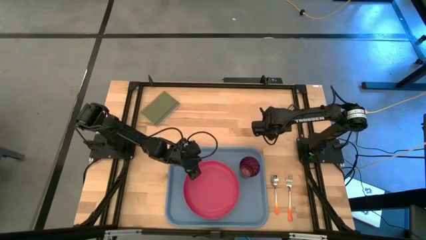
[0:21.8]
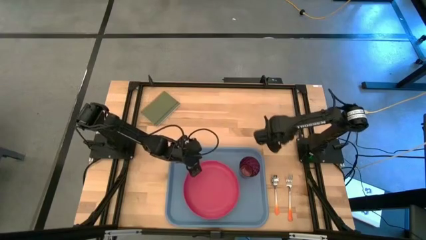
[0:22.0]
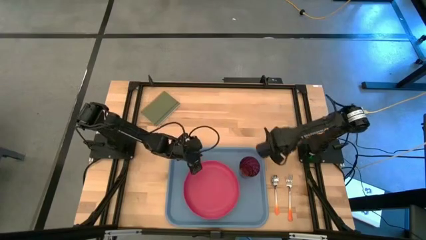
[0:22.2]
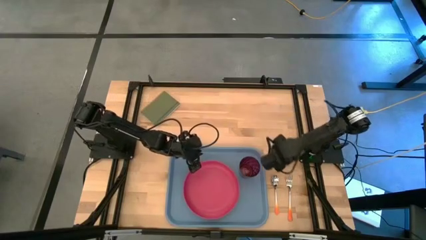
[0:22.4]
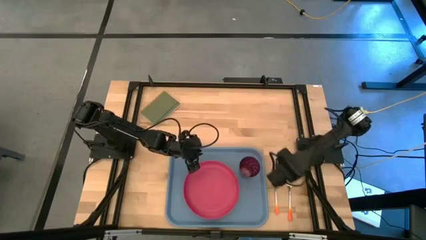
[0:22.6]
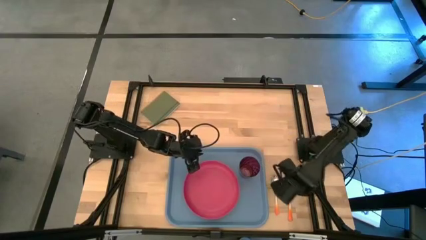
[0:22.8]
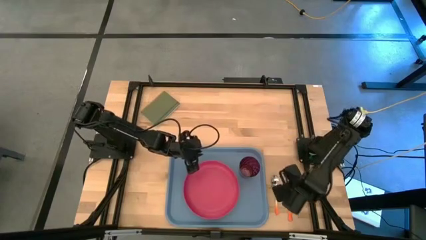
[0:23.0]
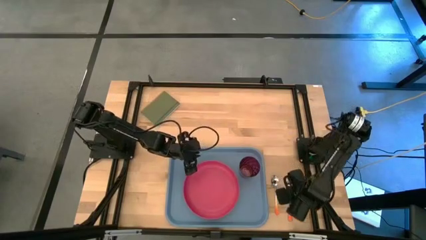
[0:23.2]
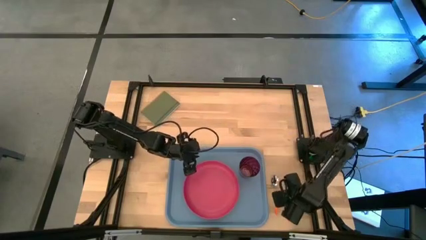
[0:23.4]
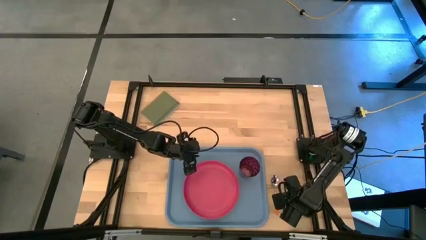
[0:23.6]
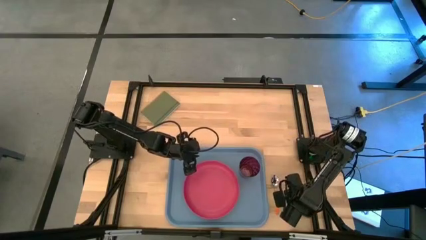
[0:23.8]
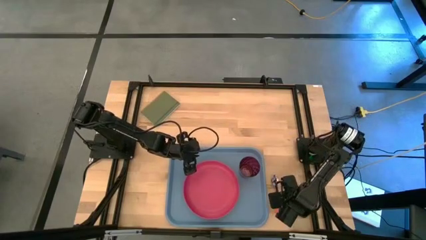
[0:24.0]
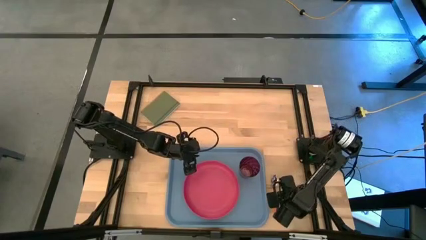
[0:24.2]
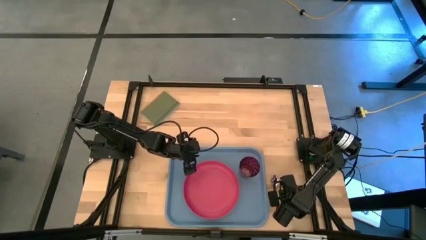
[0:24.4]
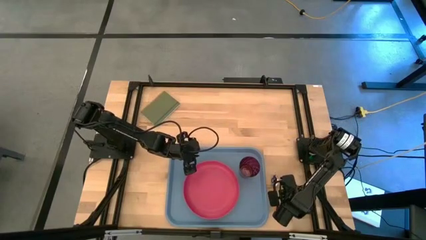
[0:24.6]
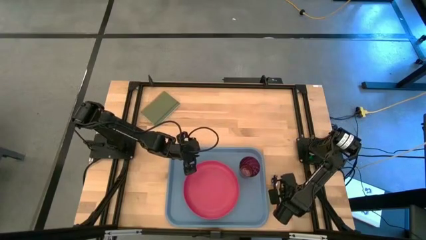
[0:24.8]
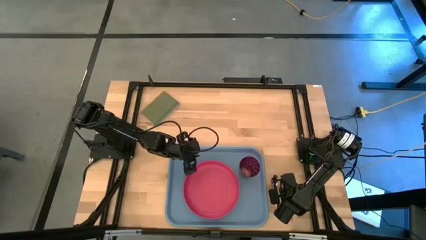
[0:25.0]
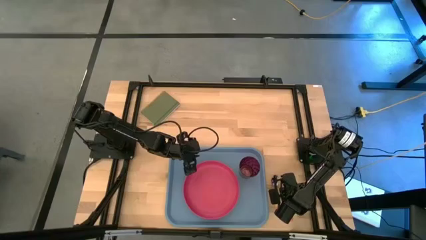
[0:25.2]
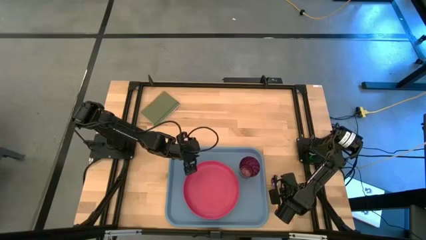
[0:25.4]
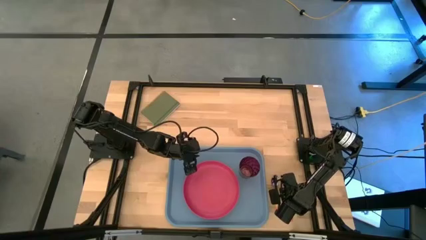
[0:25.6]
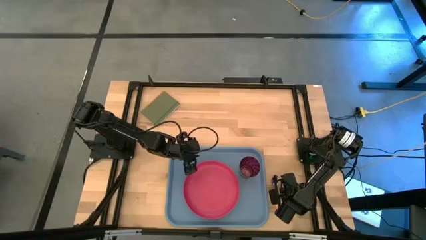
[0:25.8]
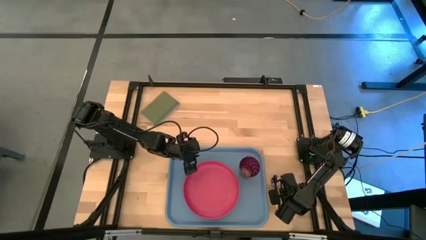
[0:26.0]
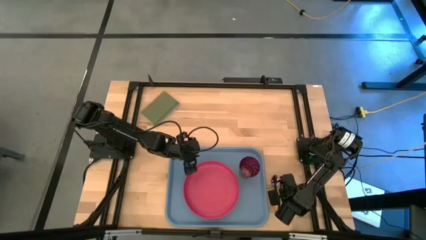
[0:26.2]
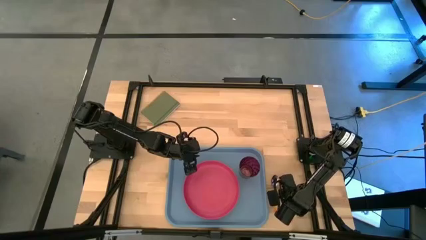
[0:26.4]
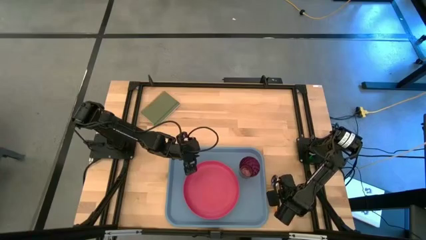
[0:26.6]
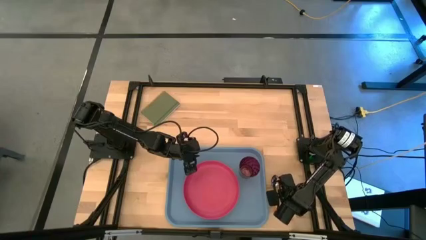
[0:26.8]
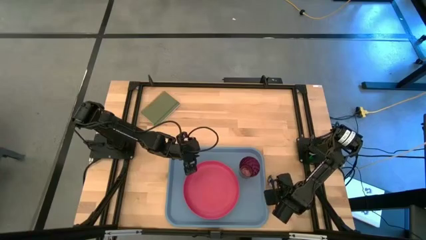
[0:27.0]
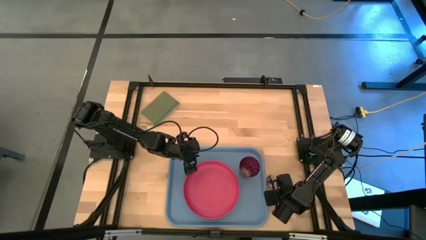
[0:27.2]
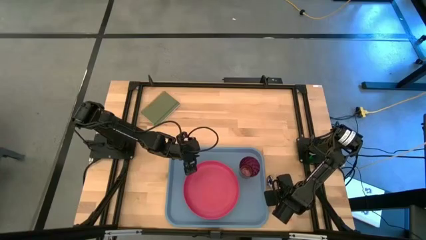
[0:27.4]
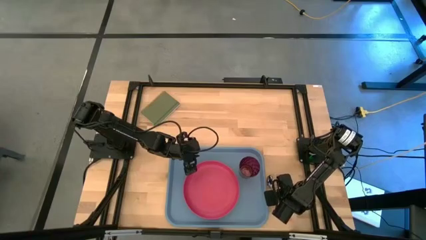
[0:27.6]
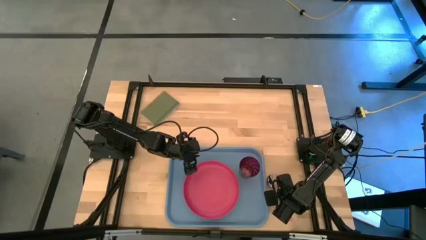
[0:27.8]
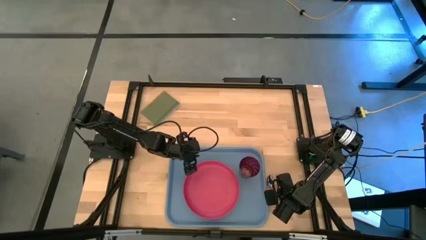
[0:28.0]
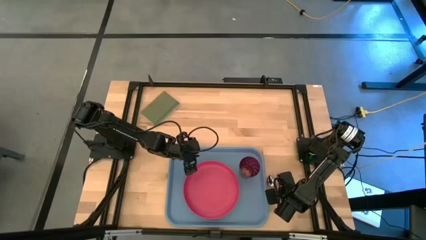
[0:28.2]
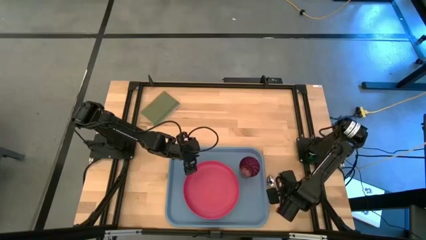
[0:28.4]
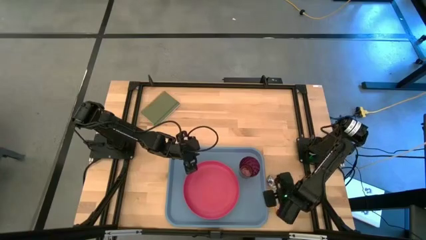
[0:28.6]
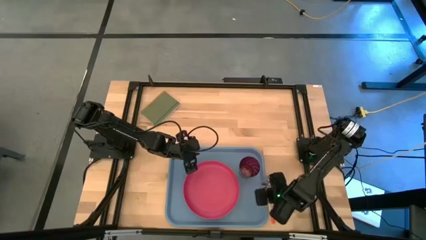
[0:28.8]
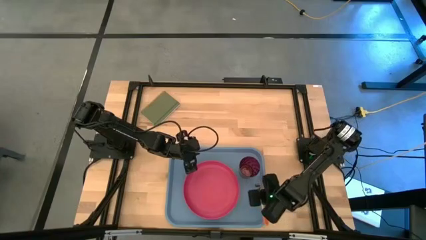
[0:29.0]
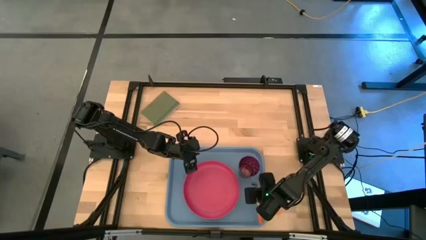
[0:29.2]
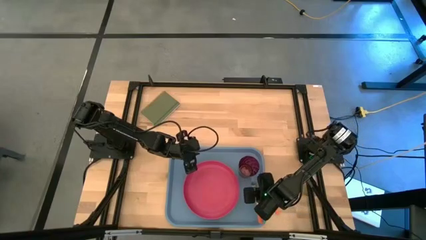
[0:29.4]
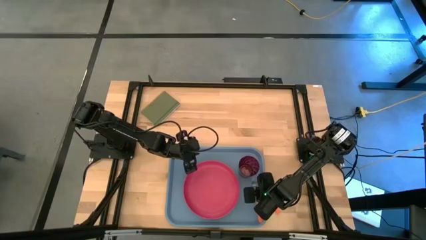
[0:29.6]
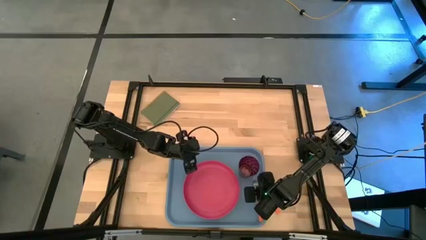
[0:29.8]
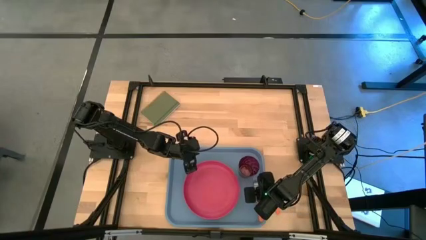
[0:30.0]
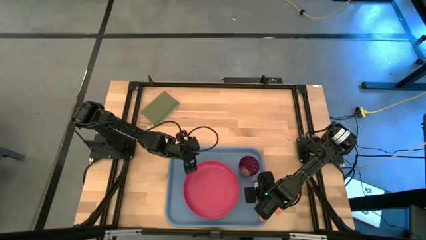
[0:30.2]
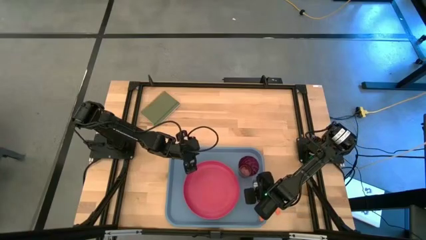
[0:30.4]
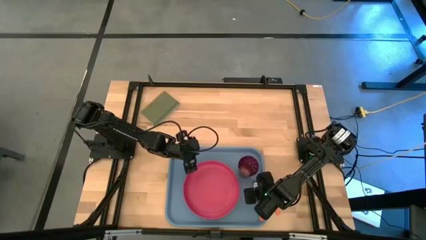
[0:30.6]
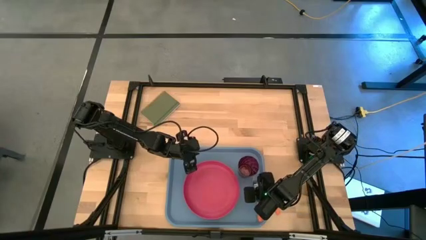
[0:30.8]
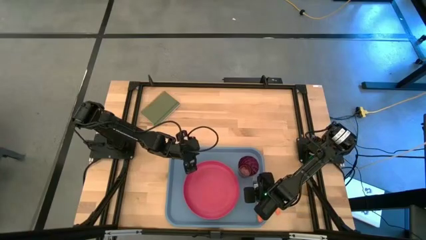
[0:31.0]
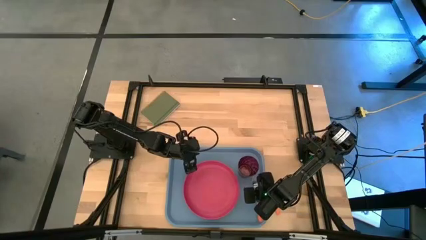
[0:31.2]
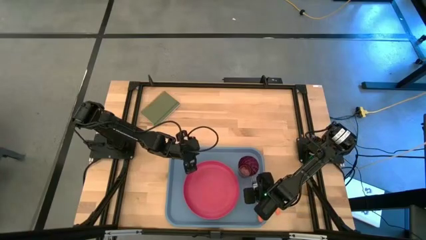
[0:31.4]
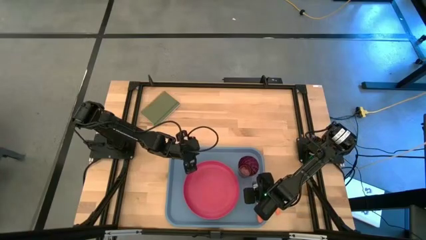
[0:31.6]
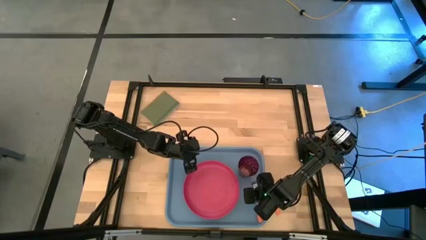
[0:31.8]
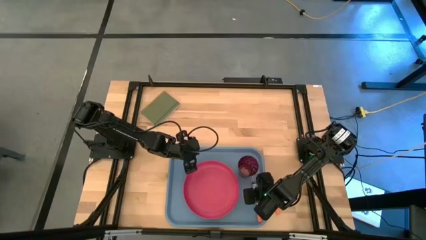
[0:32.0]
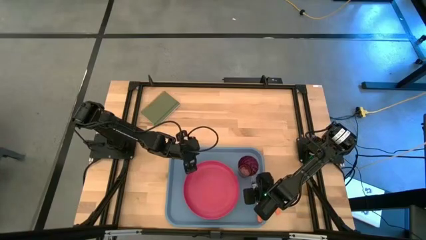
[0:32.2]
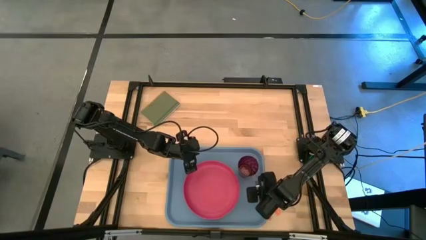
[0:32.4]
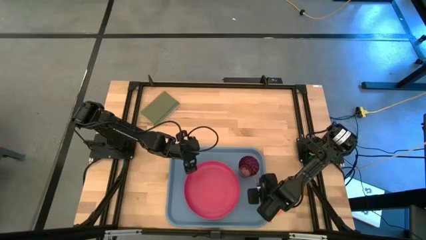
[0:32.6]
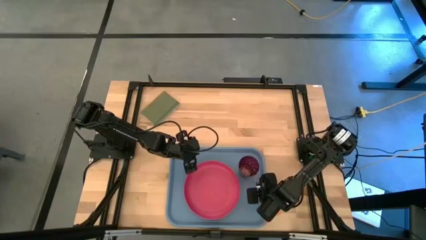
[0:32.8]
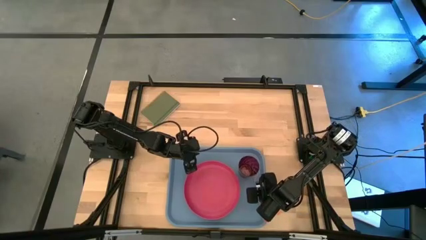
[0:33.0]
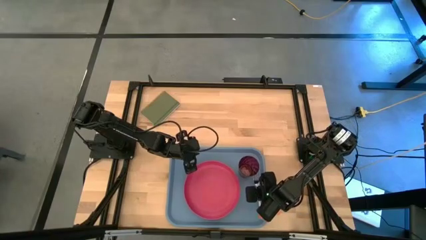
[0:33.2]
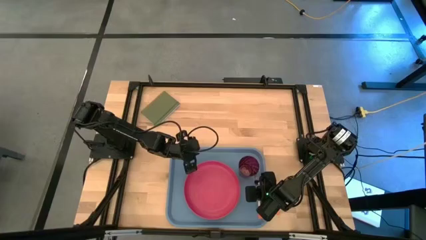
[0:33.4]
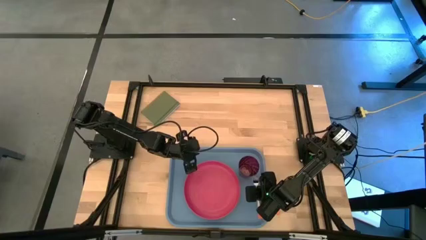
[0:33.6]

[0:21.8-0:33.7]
Task: Pick and place plate/cup/fork/spoon on tray
Put the orange fork on the blue tray to the right of the pink plate

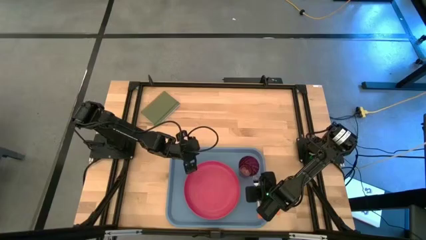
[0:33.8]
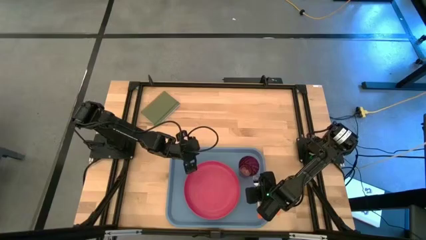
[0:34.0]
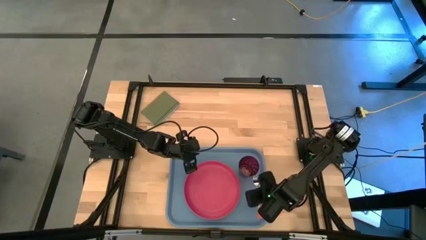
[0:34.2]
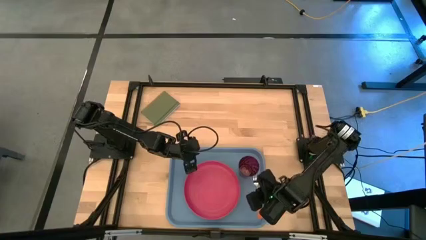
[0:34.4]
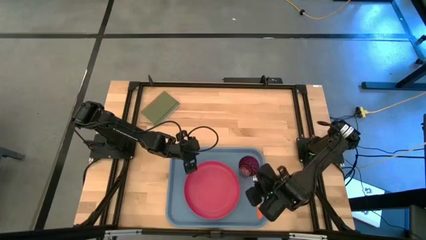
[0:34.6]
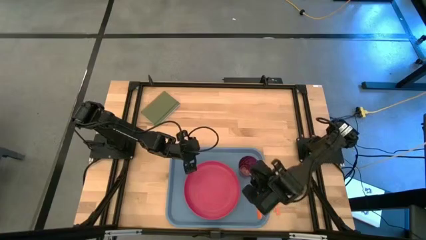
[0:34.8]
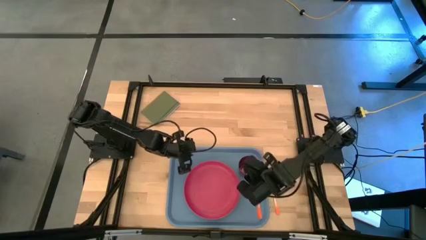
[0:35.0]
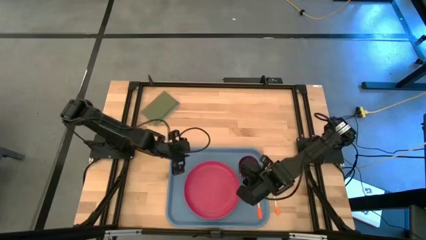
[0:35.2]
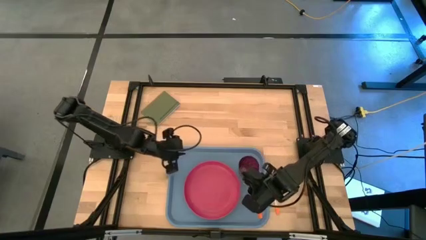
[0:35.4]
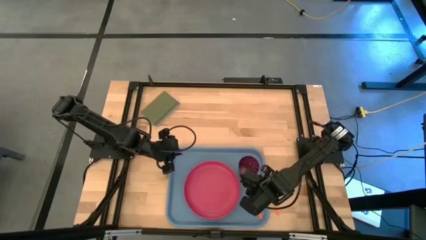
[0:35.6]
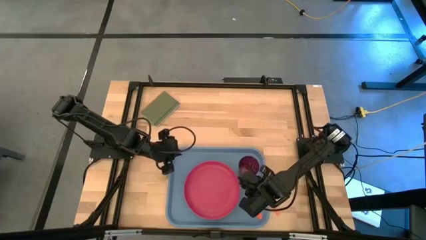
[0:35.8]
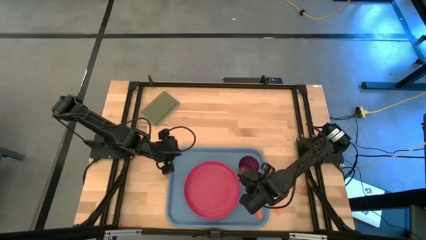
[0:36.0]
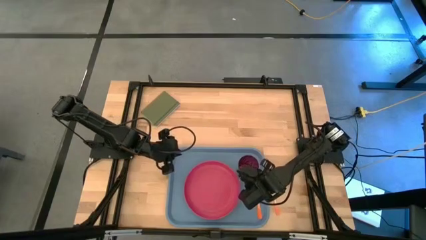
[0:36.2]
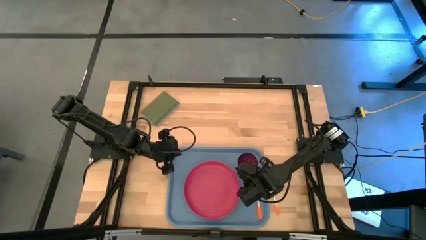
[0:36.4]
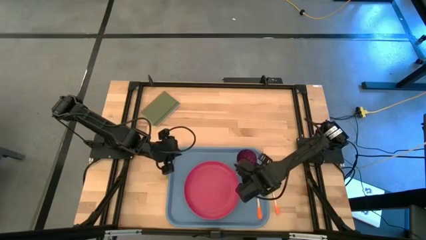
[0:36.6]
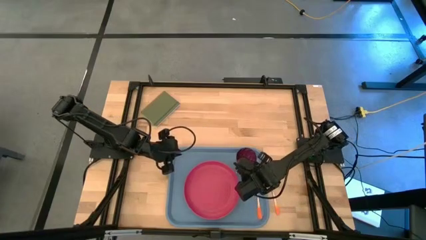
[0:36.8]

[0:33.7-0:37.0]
Adjust the red cup on the blue tray

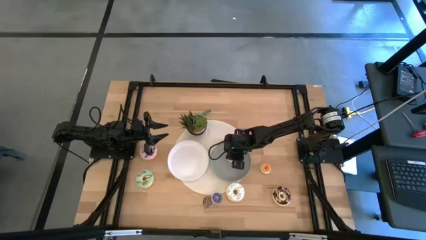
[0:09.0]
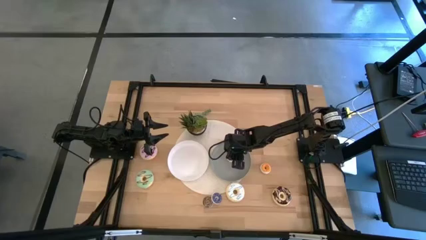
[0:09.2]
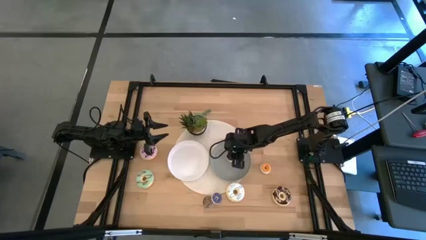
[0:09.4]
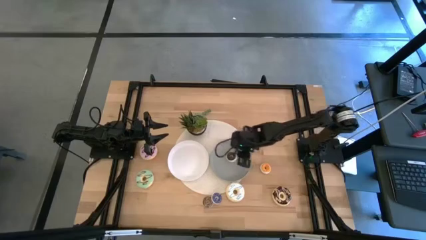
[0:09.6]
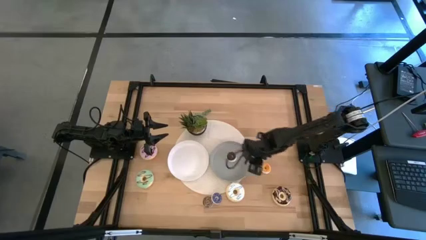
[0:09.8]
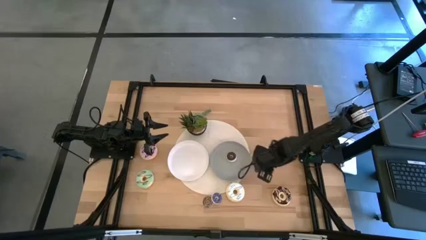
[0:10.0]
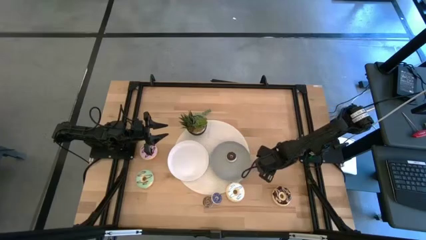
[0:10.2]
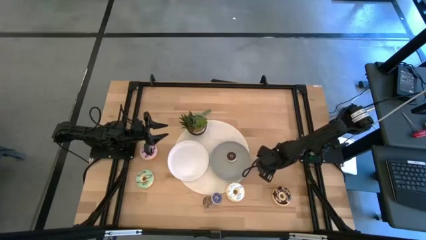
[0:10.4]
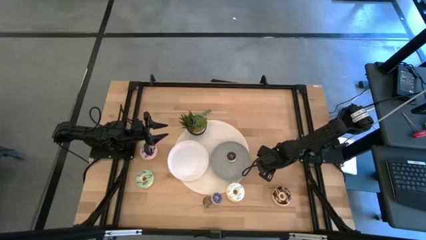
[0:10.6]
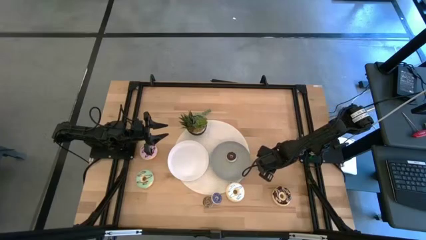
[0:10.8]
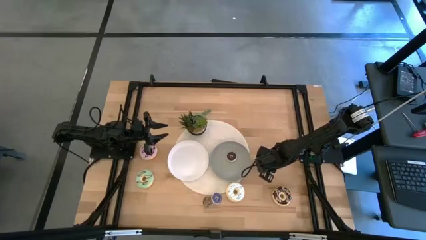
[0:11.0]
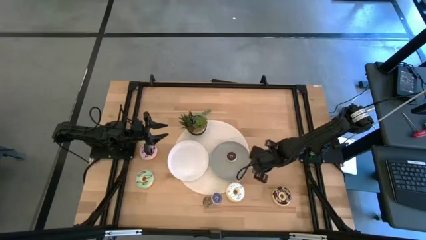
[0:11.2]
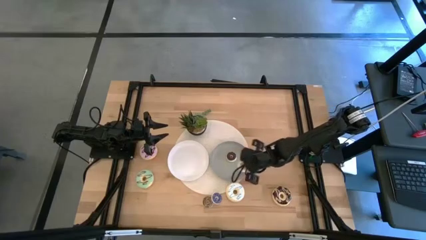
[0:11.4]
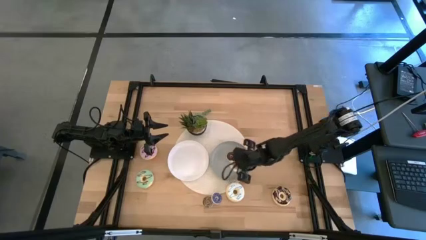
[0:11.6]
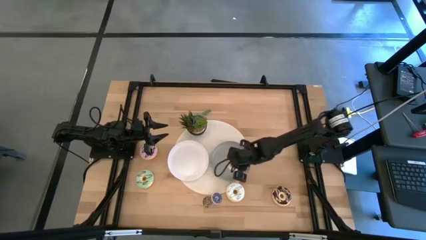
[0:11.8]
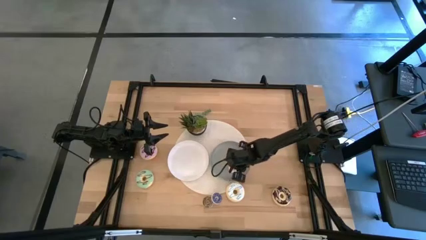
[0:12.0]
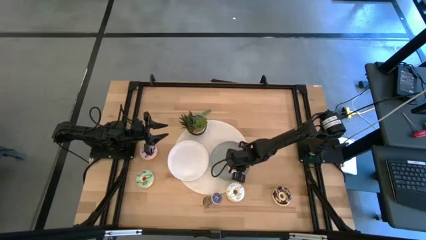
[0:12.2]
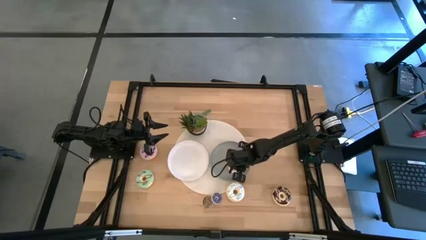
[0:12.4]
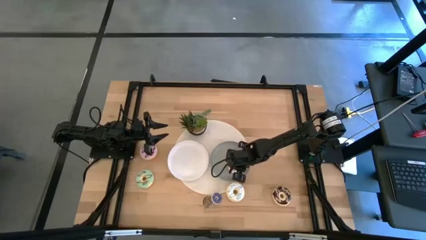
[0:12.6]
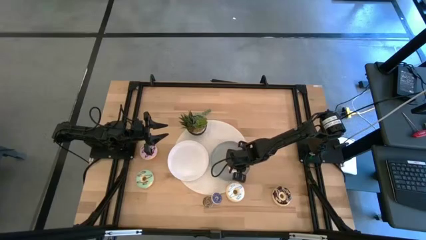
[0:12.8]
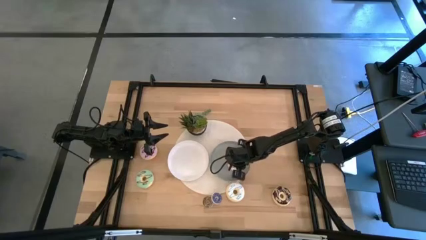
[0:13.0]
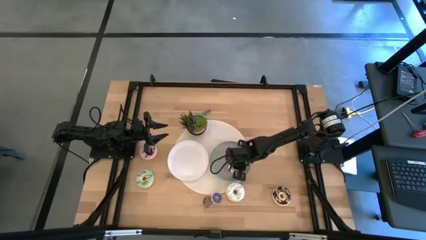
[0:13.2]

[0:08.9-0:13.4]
Task: Pick & Place donuts
Put the small orange donut onto the gray plate
